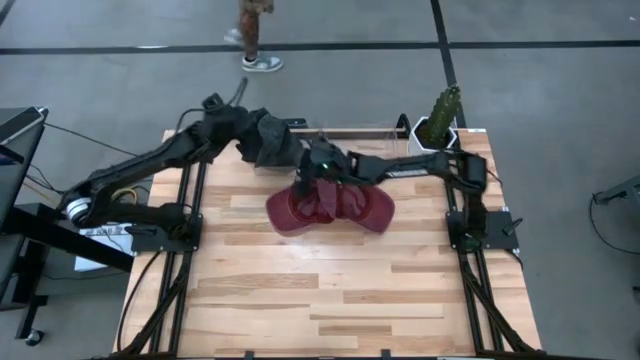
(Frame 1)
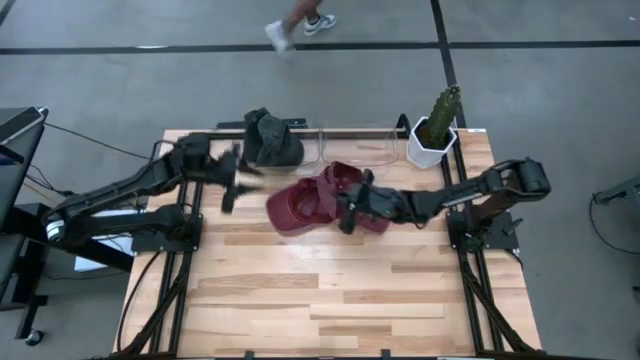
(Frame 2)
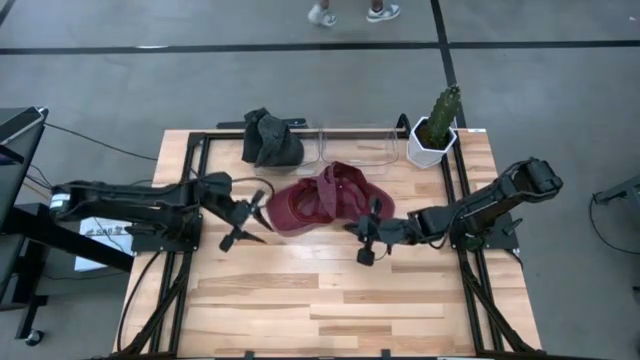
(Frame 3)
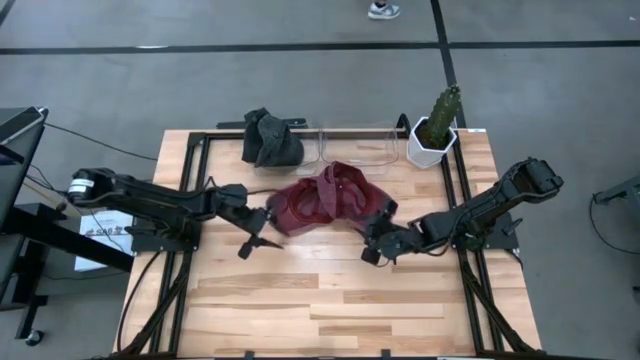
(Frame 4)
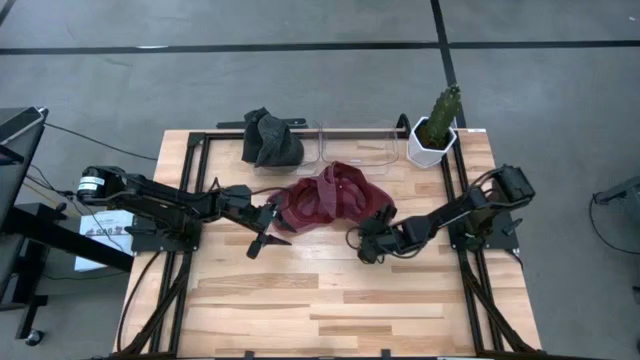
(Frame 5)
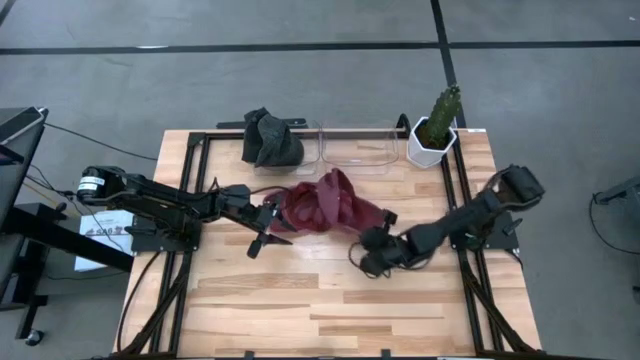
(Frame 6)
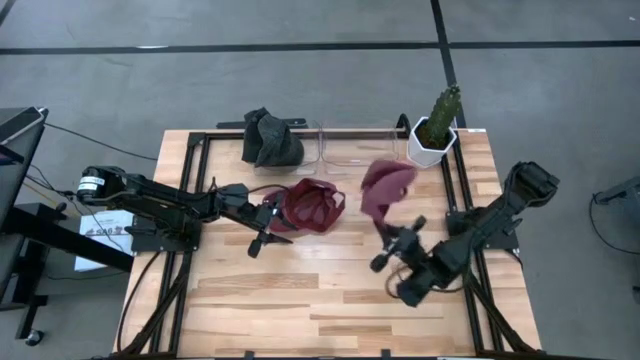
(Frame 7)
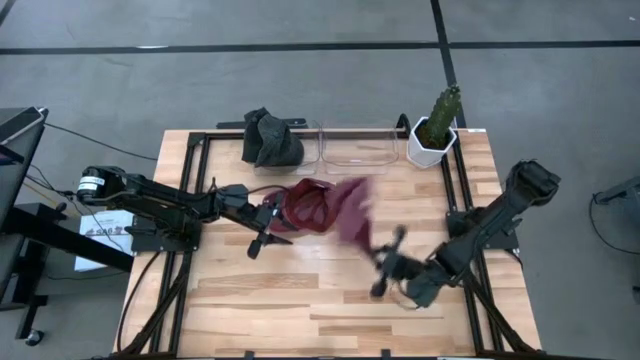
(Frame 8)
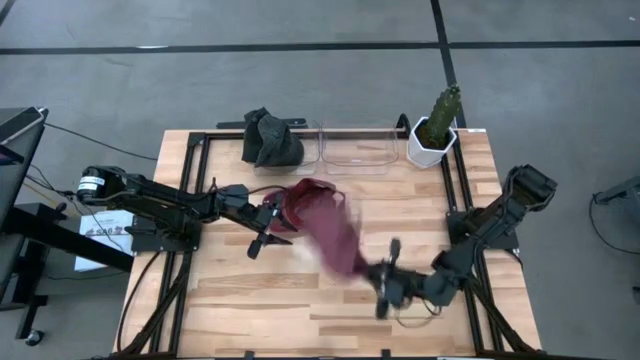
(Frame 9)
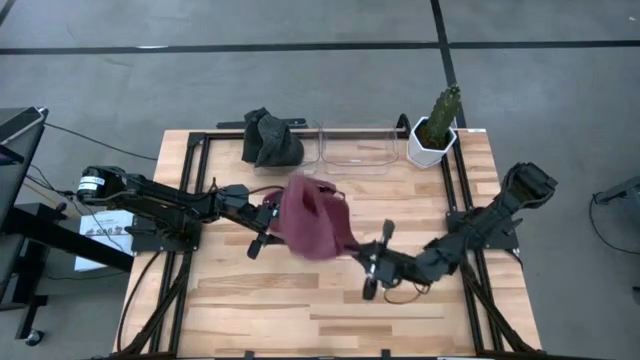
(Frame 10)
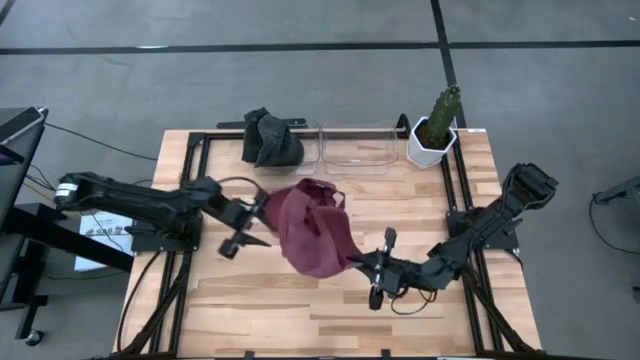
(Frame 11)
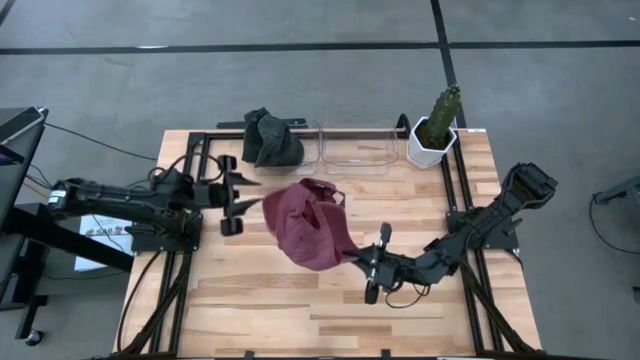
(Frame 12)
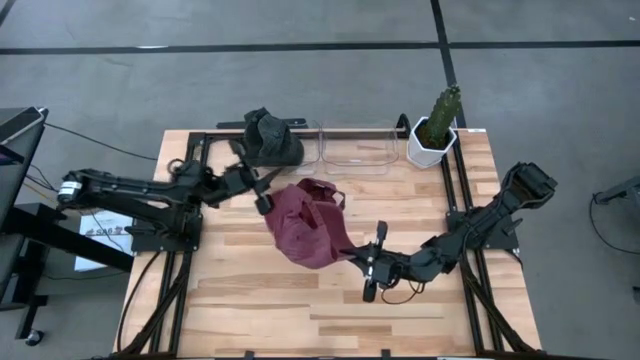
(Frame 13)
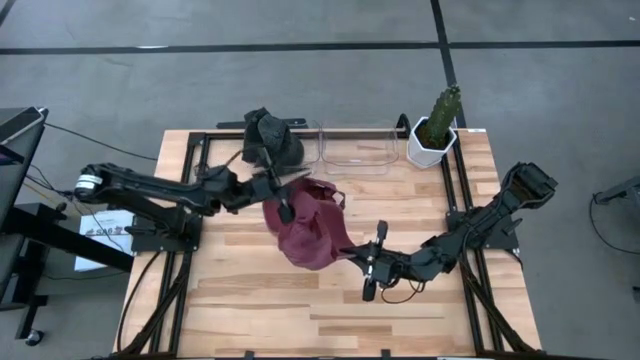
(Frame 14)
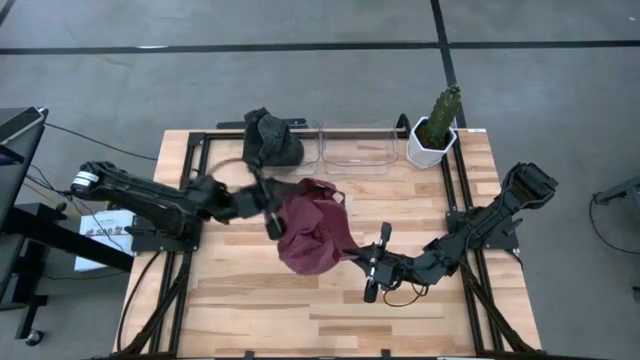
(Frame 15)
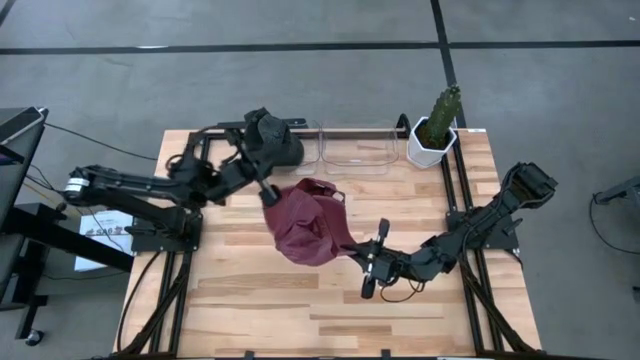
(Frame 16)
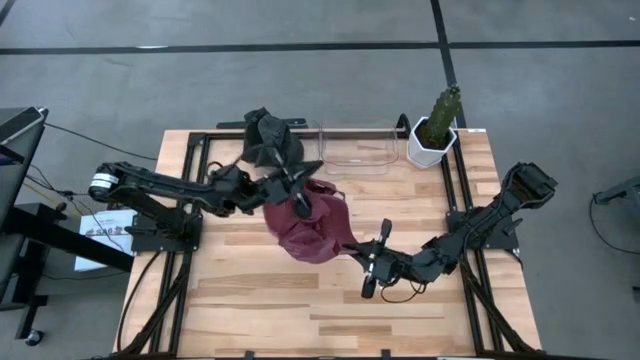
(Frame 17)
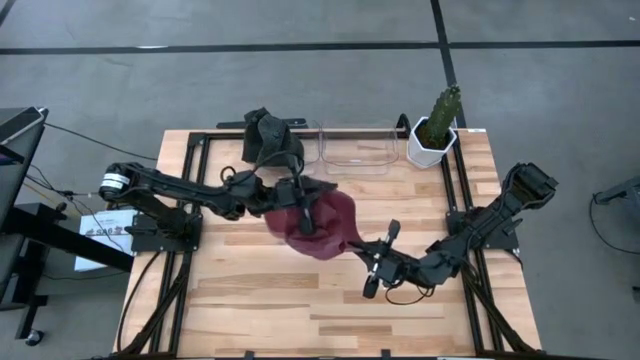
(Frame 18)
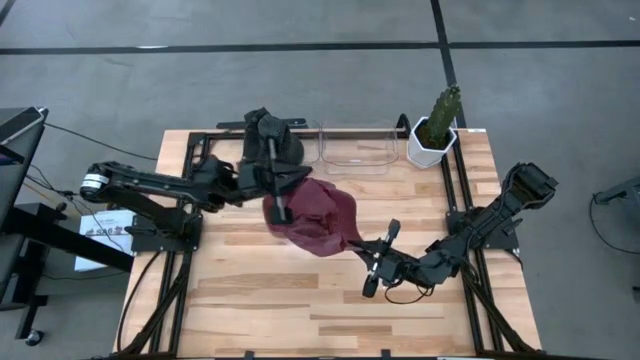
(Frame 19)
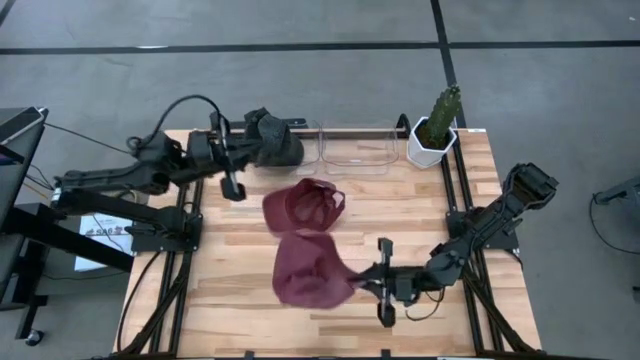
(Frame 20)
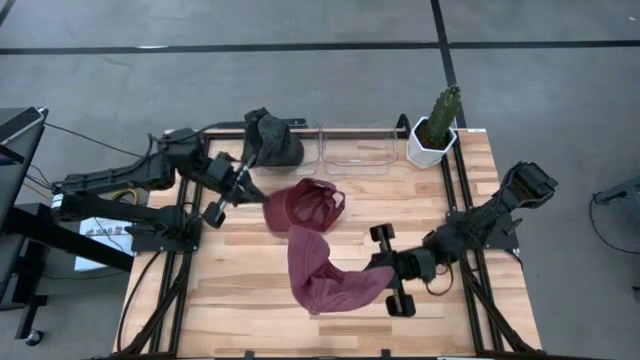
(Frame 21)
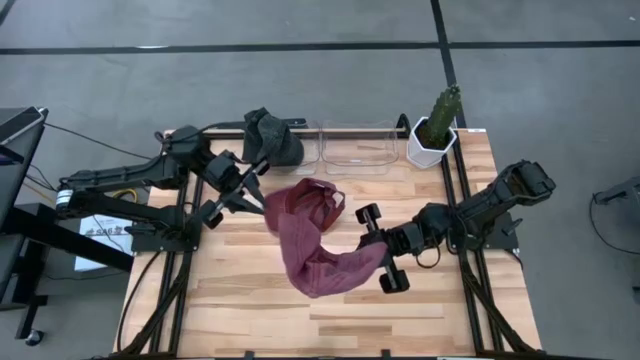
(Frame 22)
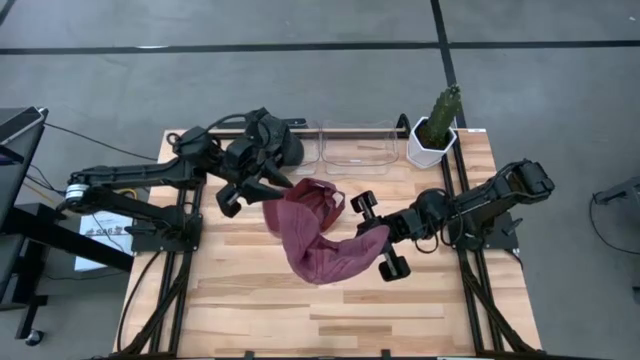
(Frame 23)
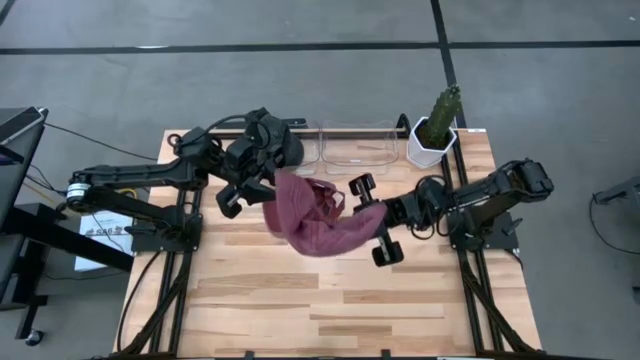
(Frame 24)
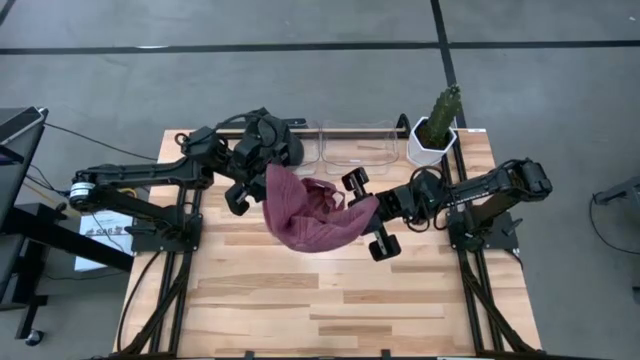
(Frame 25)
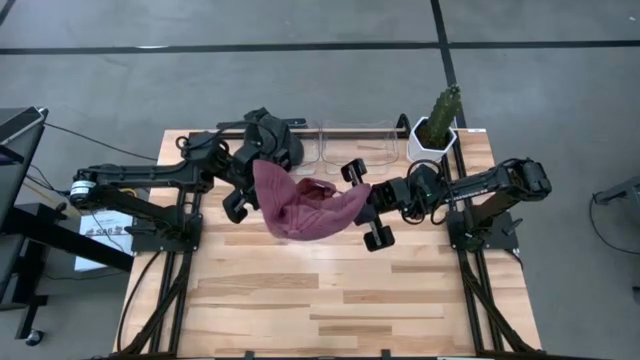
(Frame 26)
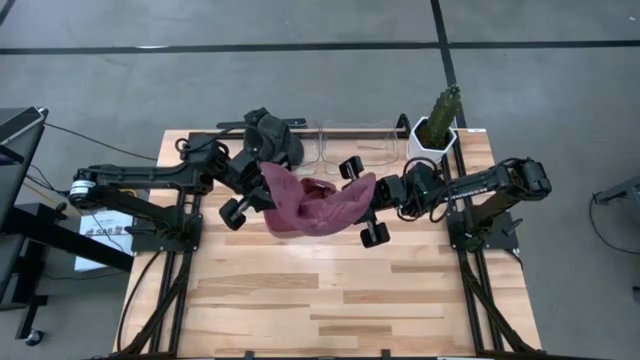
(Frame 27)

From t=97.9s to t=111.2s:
Task: Pick & Place hat
Put the right red cap into the right transparent bin

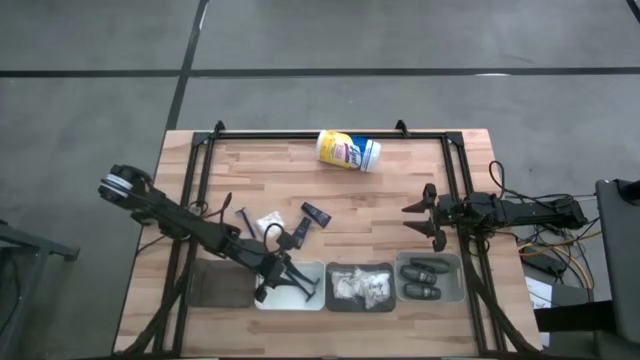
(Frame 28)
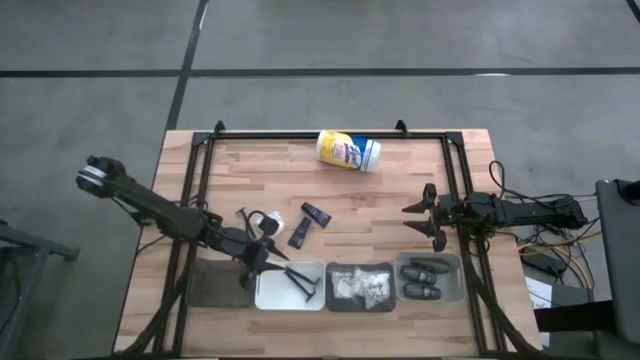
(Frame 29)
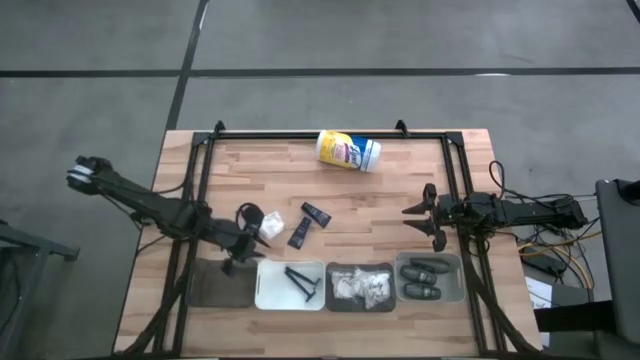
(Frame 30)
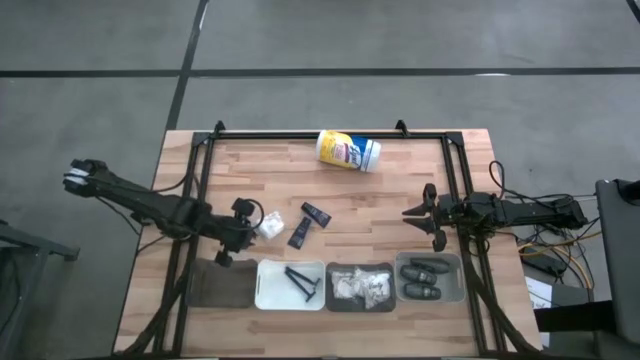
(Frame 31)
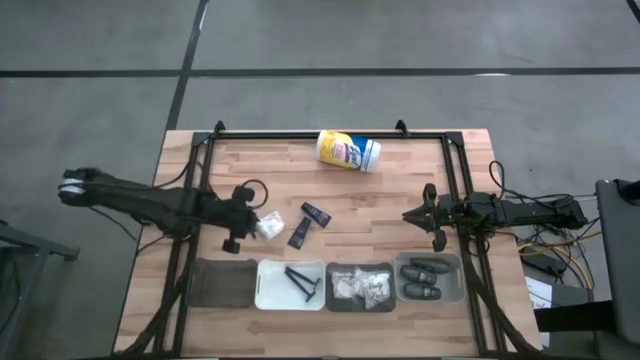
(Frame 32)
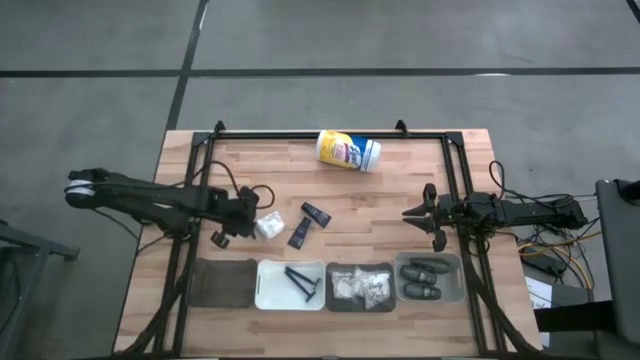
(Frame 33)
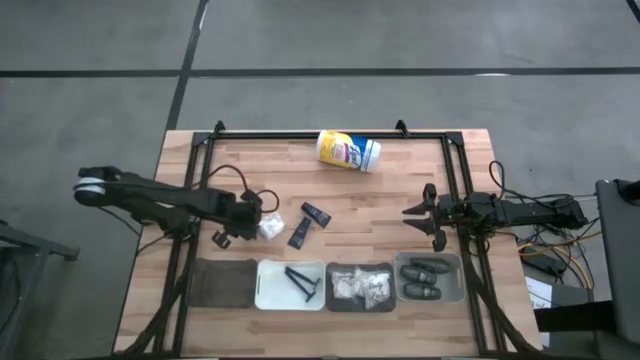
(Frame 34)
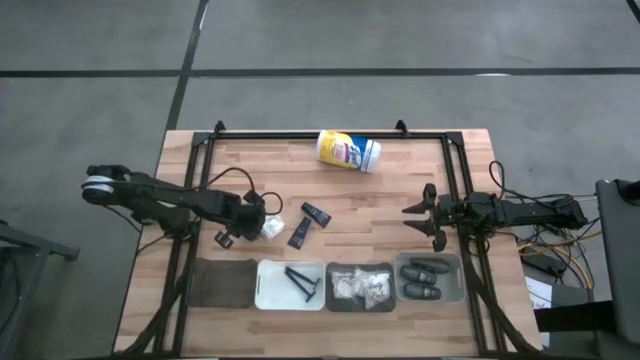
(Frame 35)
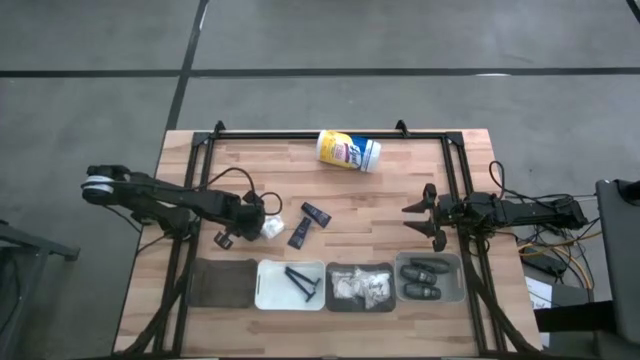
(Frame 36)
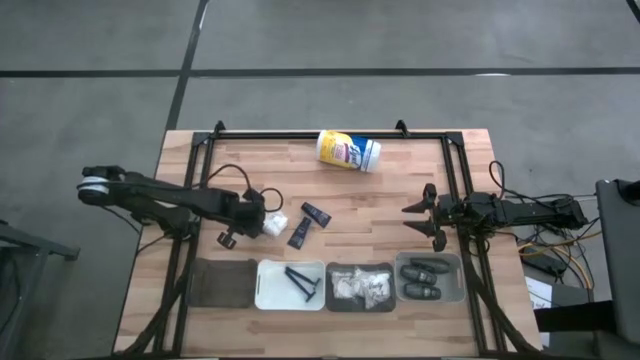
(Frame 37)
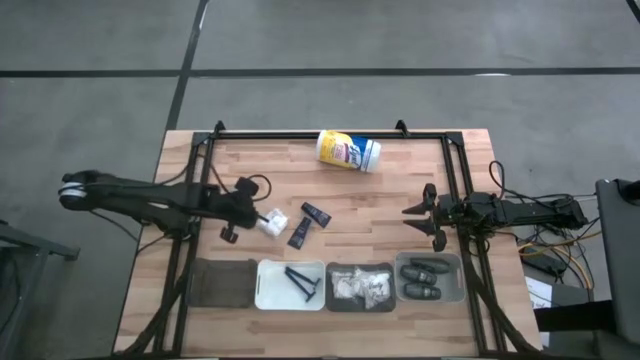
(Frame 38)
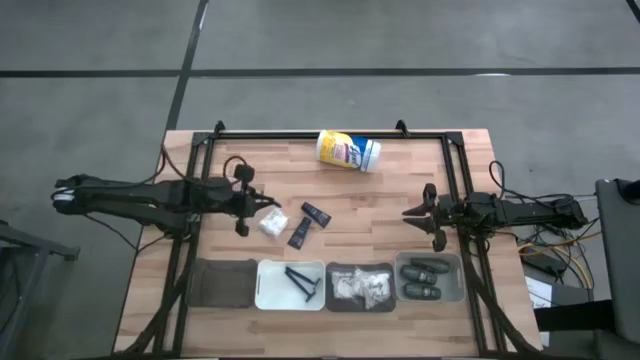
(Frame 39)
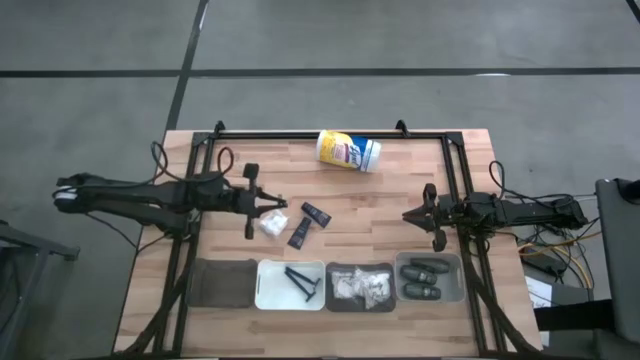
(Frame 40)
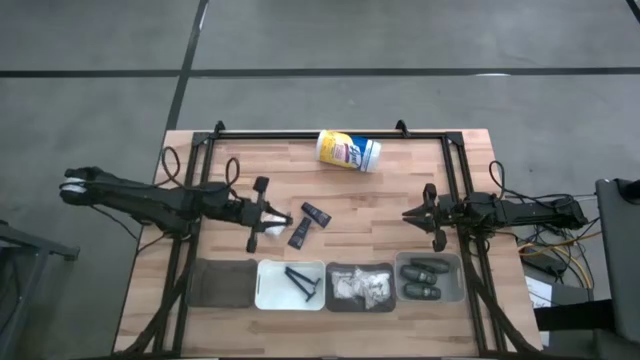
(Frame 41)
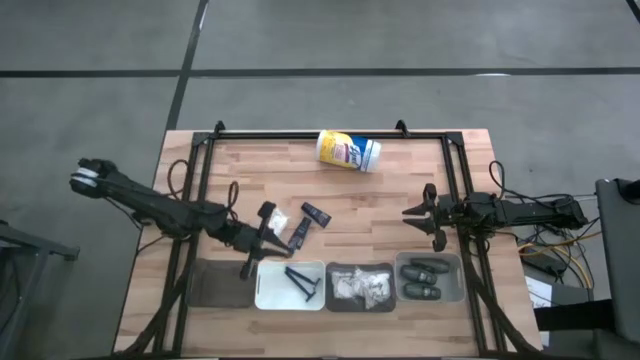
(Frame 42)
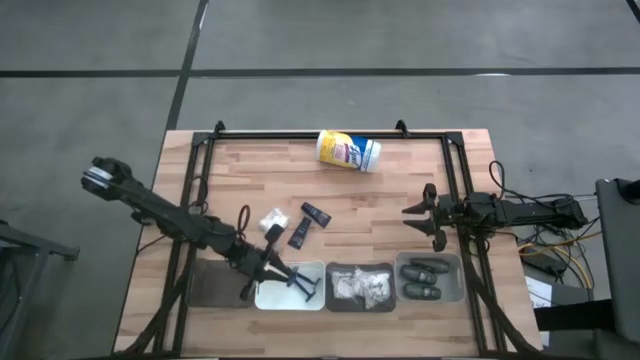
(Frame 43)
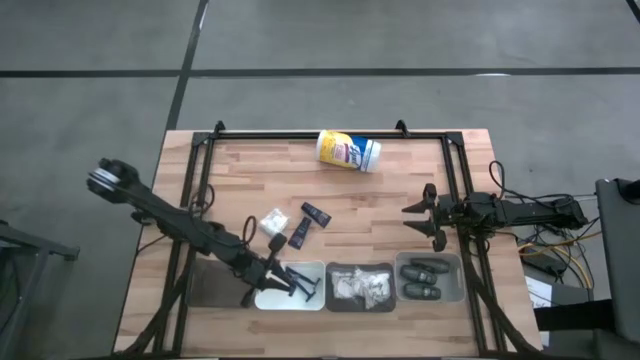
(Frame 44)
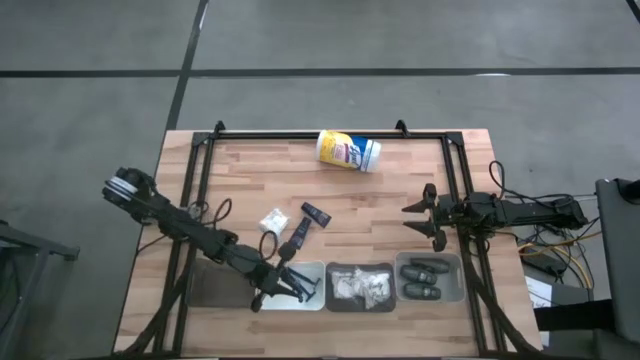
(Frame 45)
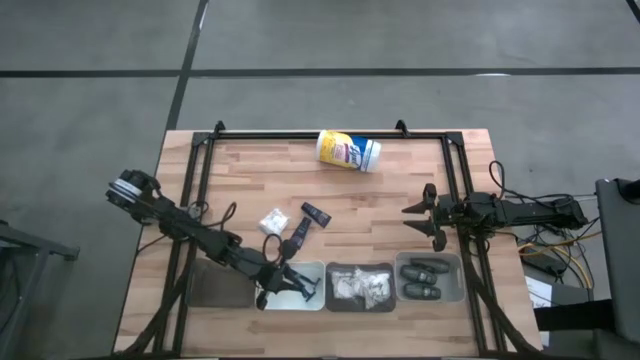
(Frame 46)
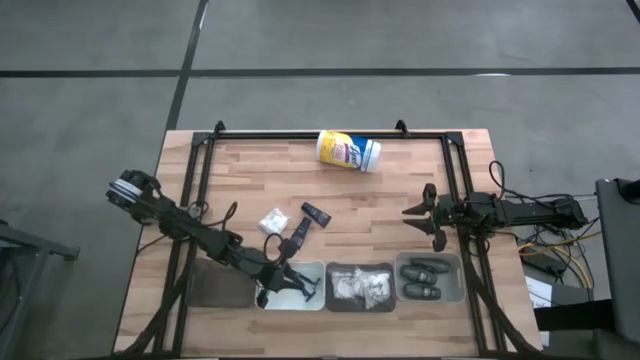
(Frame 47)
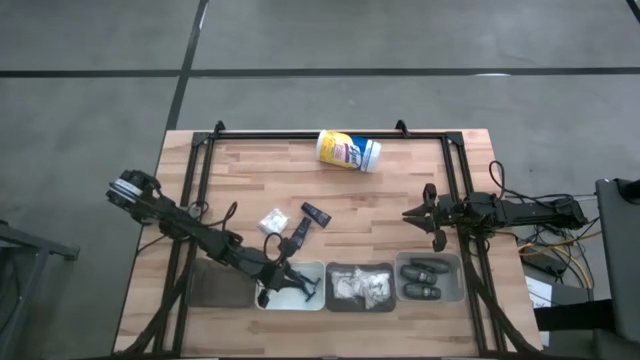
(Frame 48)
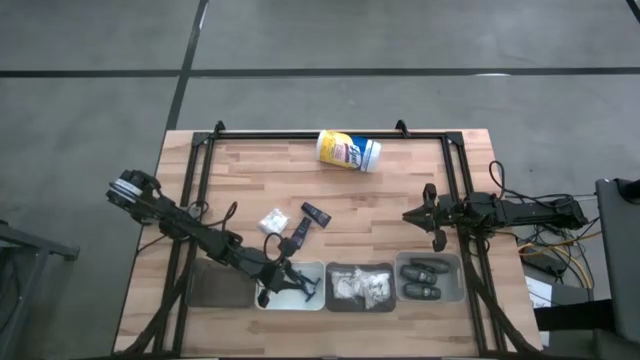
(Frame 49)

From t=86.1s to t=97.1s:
Task: Pick & Place Travel size toiletries
Put the blue razor into the white bin
